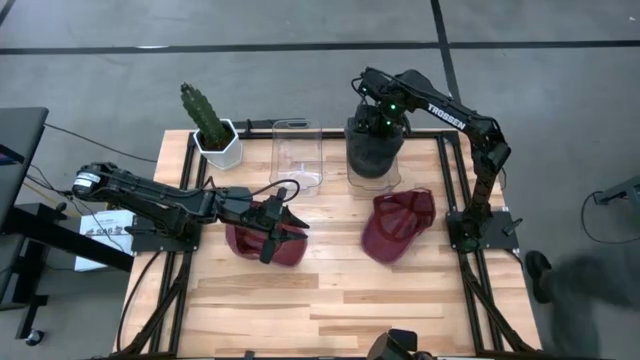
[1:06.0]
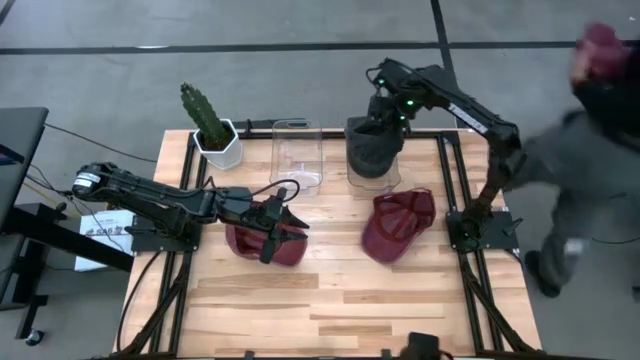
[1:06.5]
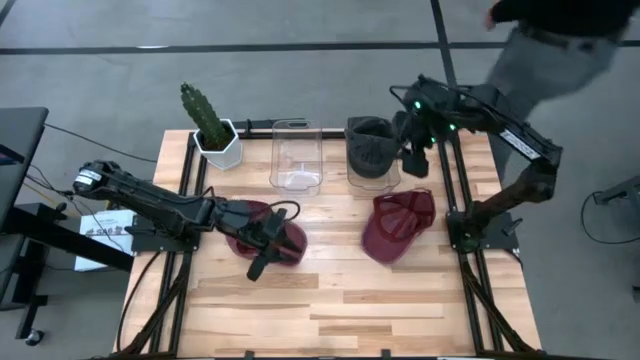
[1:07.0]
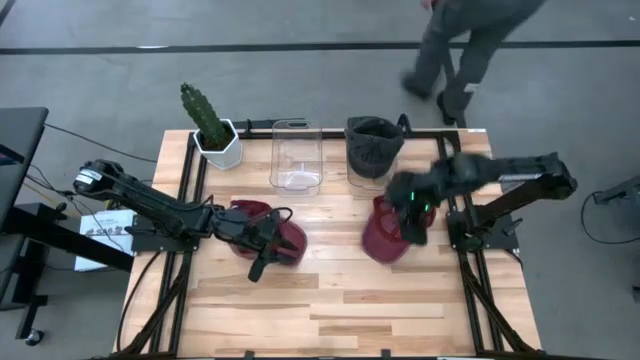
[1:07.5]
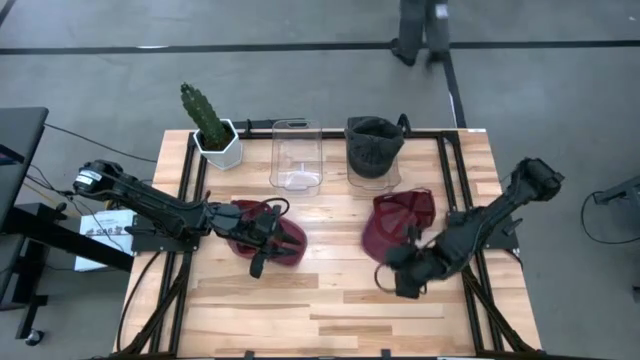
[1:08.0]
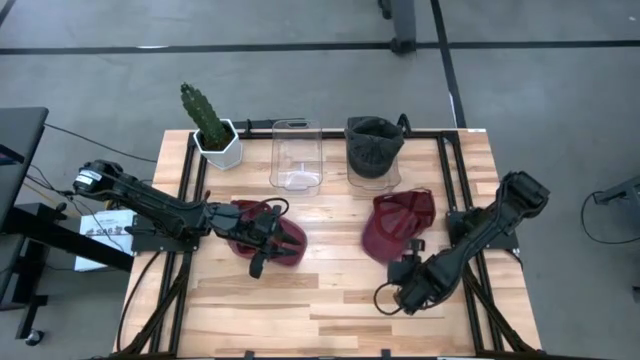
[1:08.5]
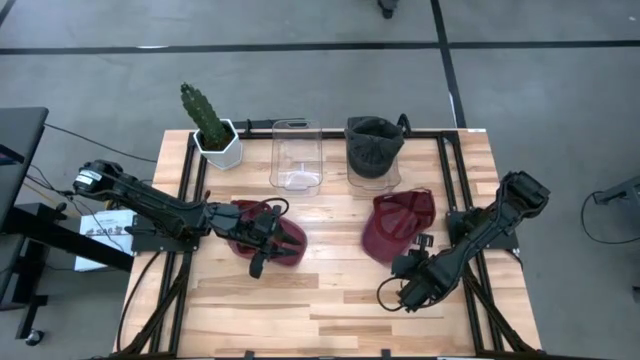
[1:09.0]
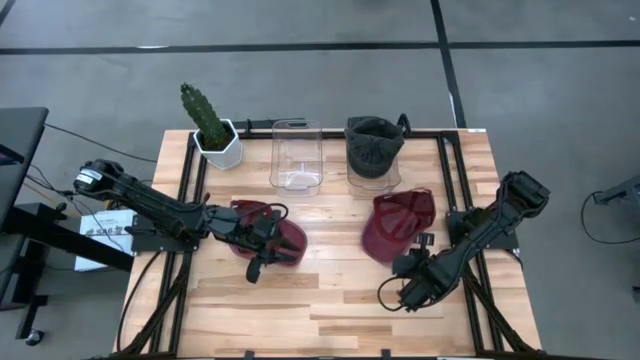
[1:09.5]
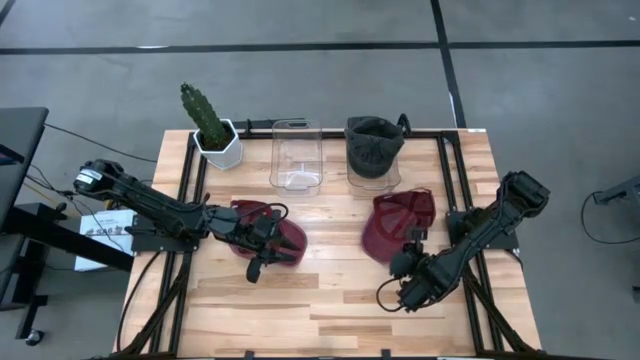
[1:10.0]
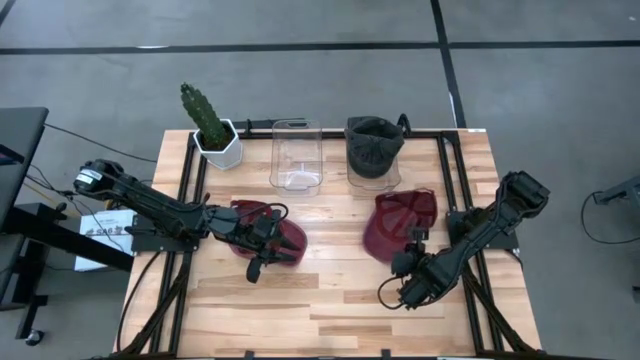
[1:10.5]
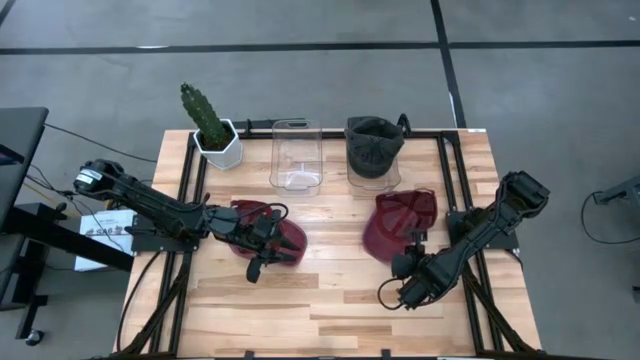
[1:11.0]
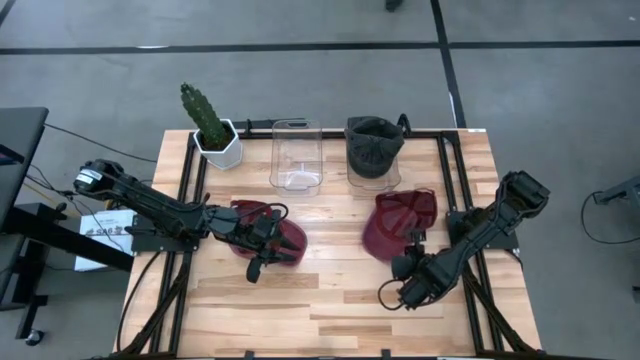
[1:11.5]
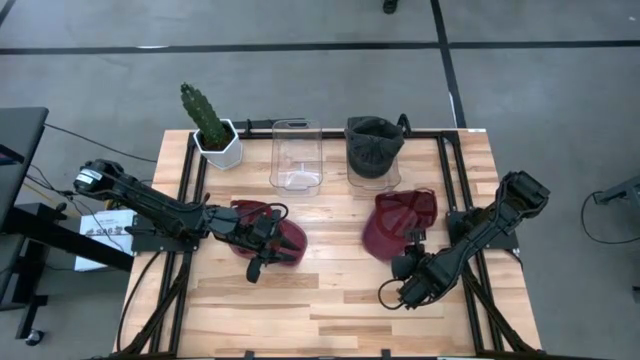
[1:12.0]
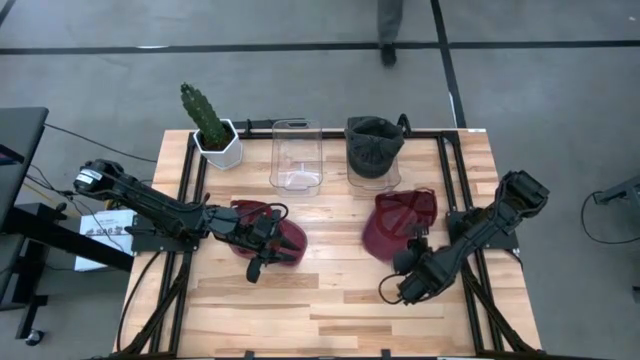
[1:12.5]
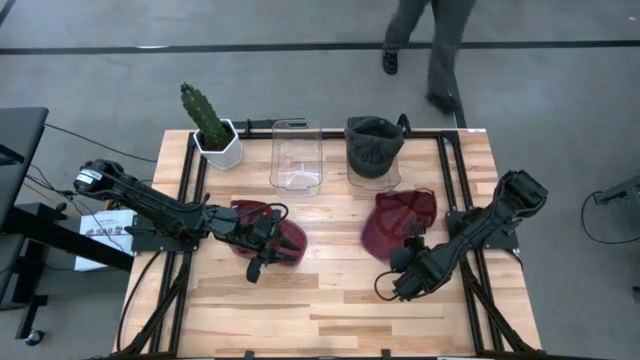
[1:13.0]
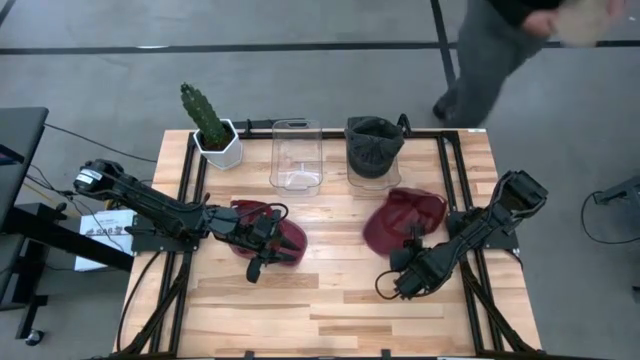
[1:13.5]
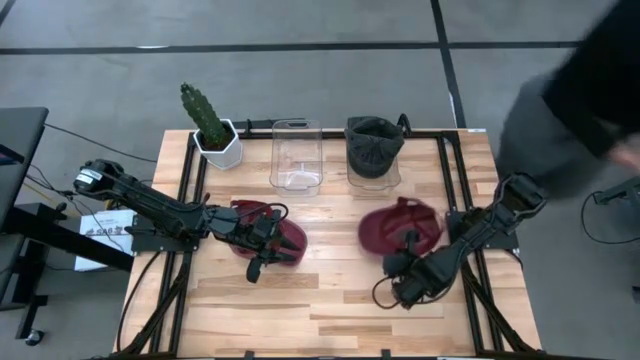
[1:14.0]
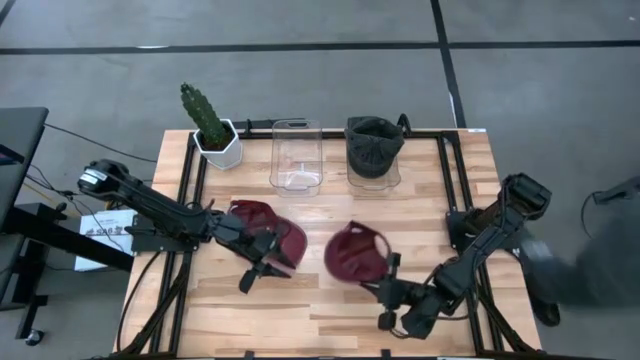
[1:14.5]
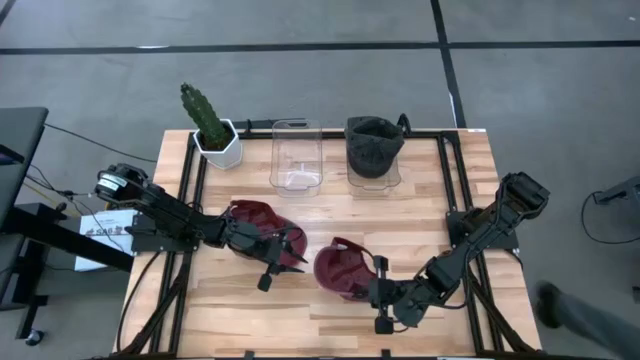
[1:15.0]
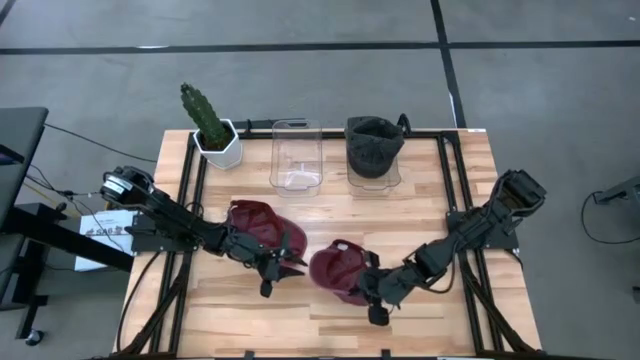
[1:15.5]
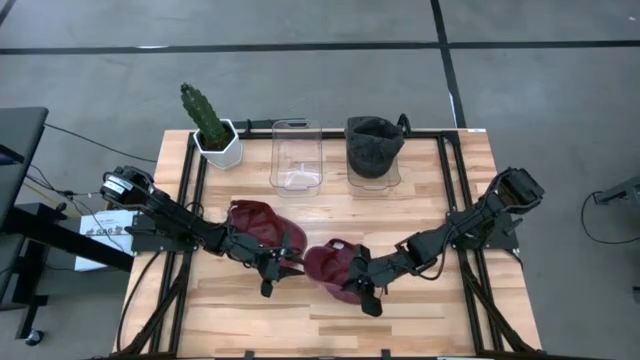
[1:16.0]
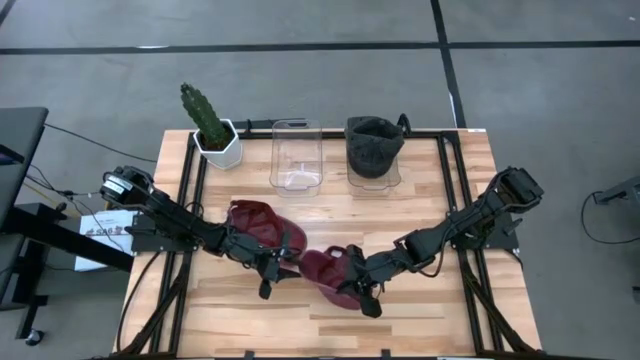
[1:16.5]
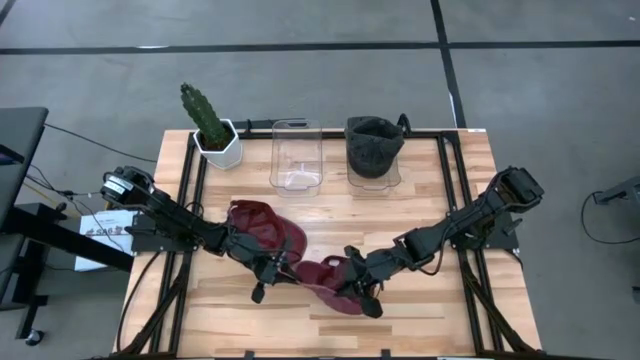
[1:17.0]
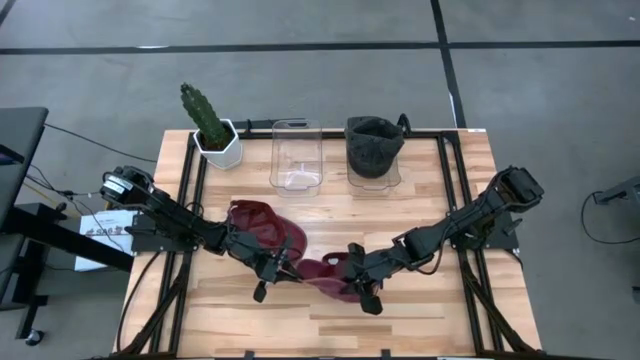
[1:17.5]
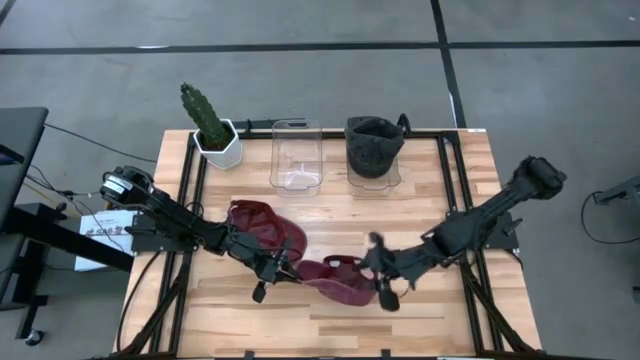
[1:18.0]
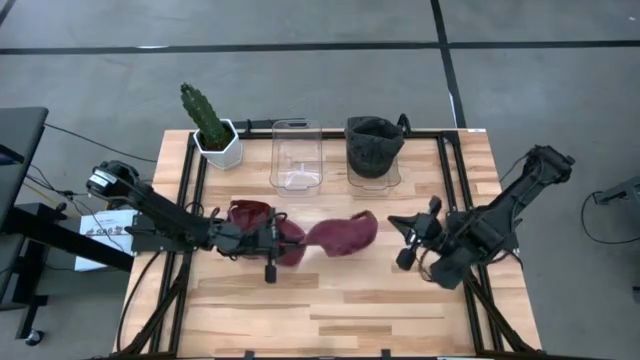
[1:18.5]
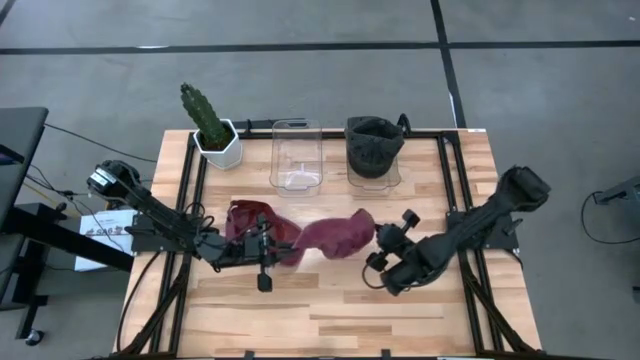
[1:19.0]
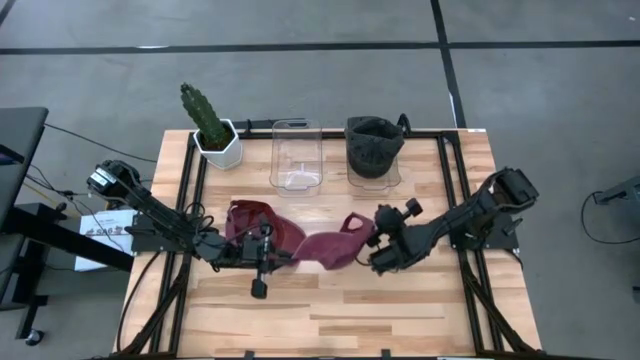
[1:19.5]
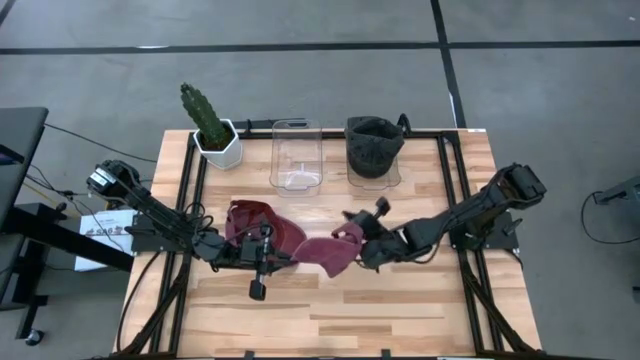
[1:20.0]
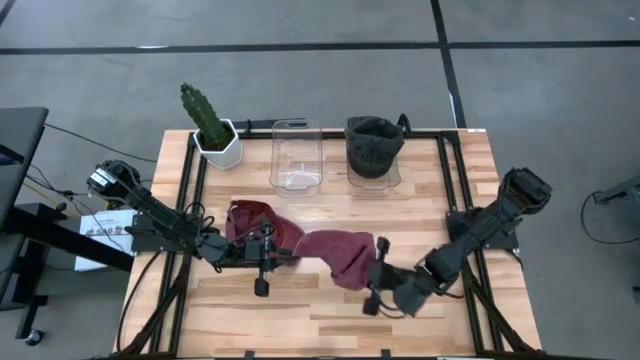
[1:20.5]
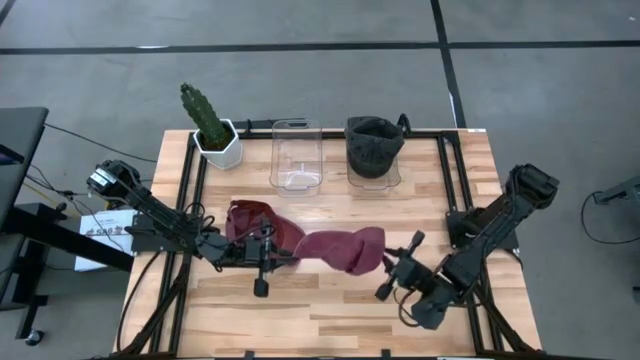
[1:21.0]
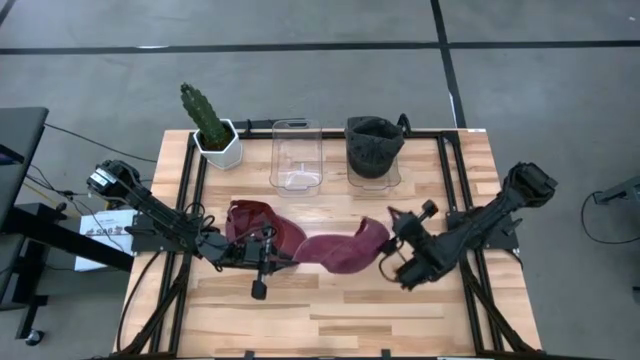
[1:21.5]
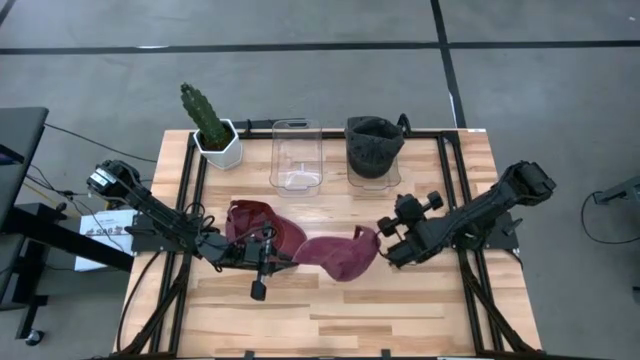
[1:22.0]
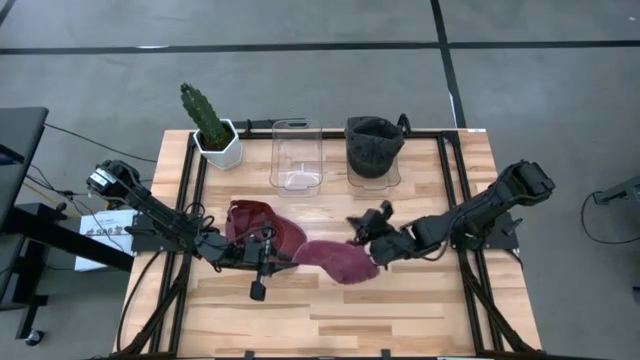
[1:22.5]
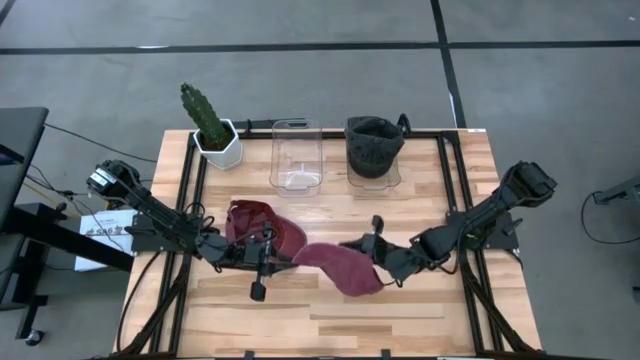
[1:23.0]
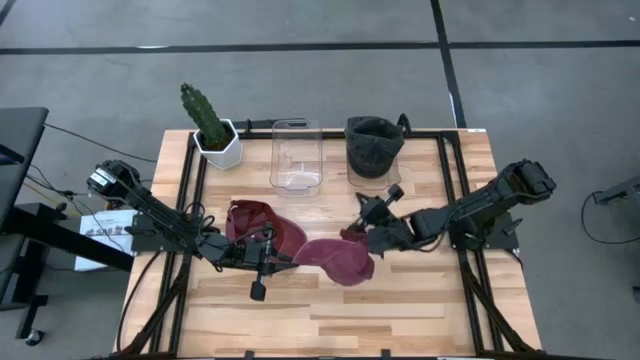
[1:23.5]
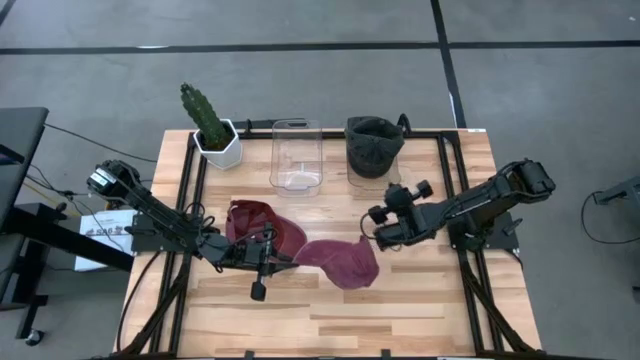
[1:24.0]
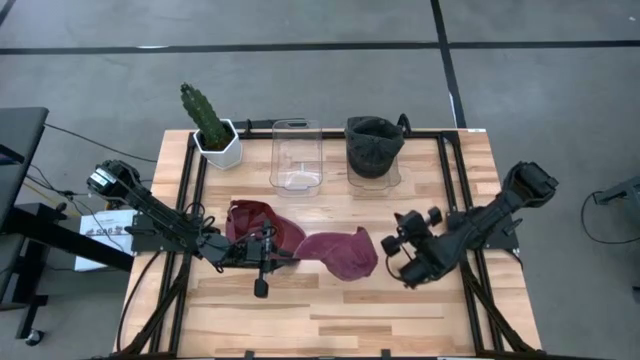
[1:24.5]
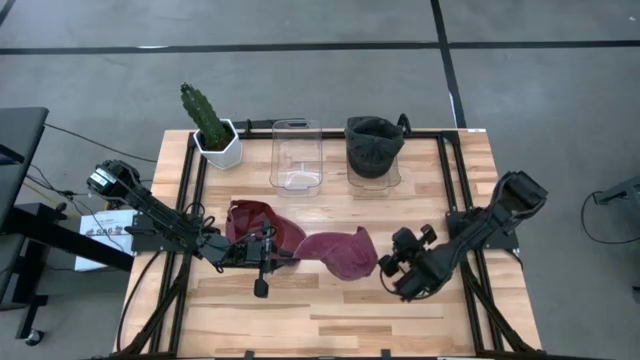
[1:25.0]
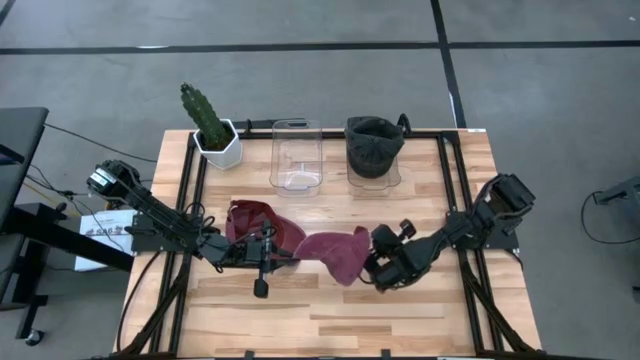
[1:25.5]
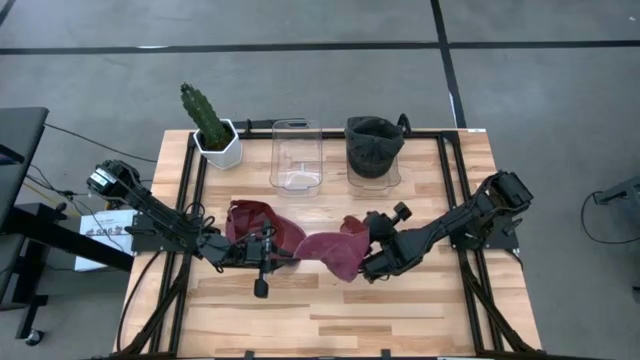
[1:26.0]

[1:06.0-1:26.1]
Task: Pick & Place hat
Put the right red cap into the transparent bin
